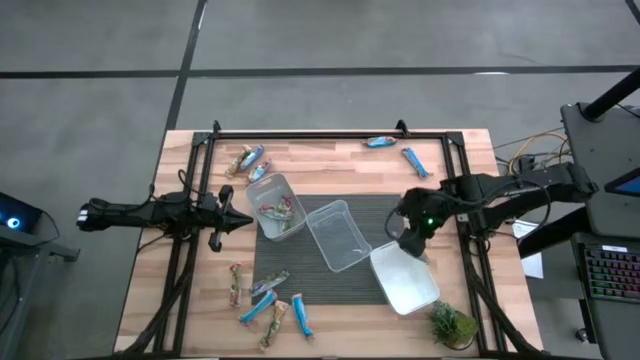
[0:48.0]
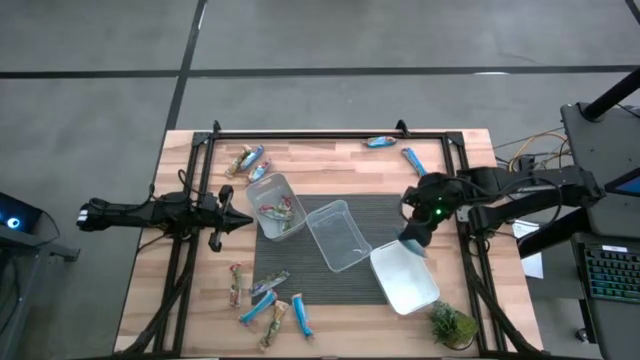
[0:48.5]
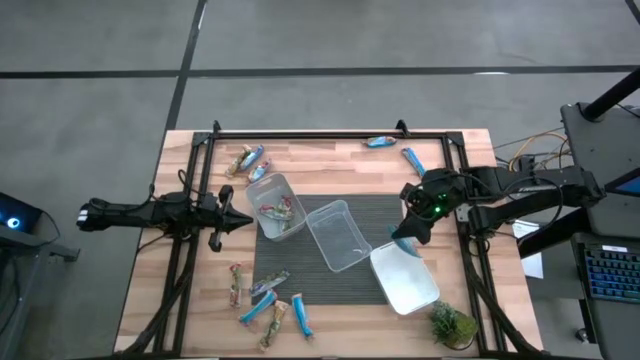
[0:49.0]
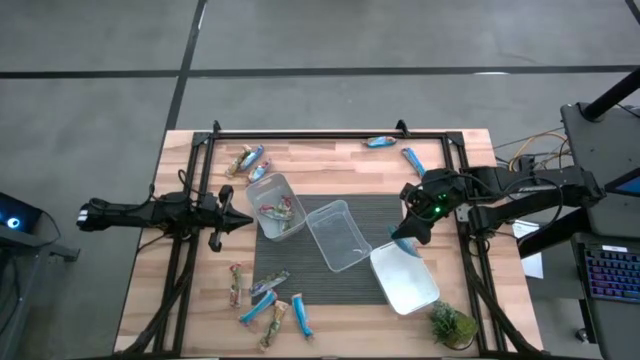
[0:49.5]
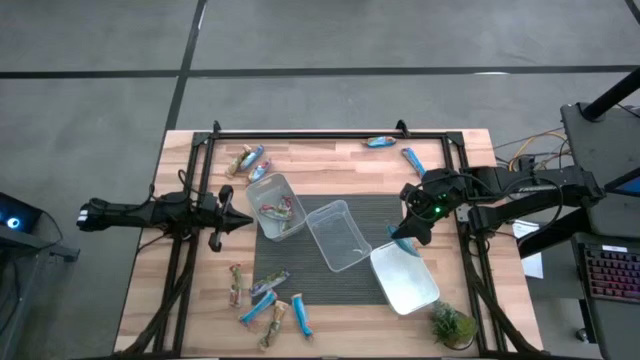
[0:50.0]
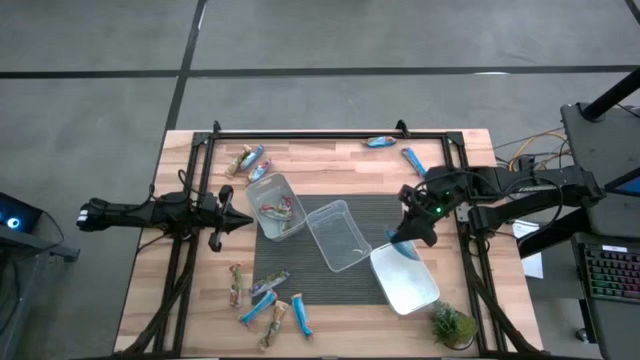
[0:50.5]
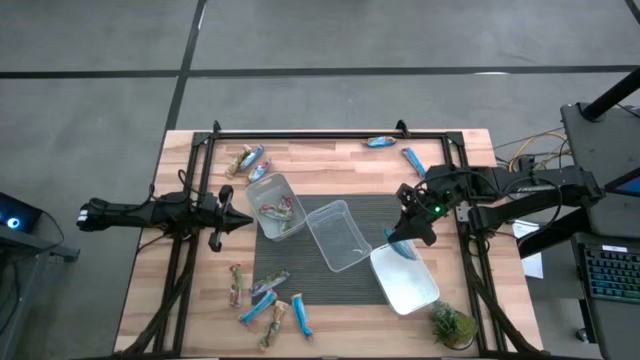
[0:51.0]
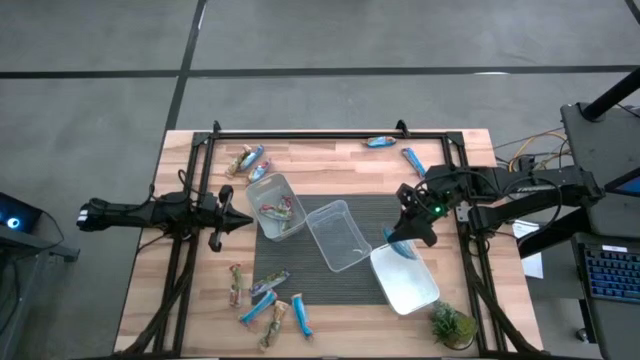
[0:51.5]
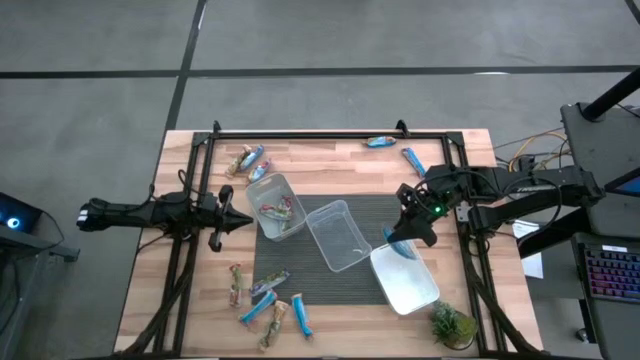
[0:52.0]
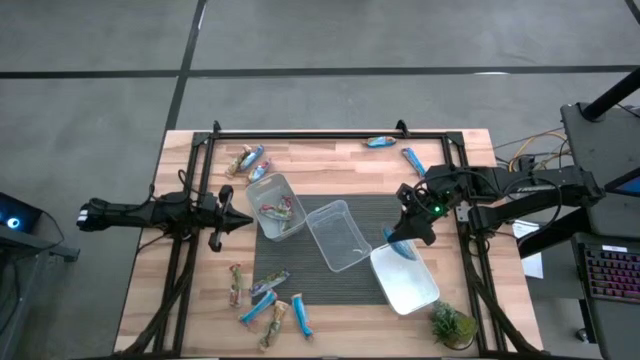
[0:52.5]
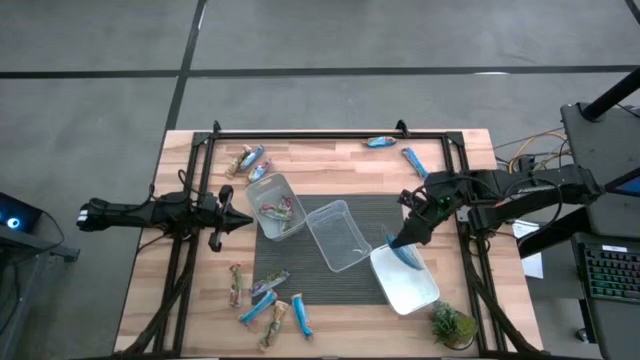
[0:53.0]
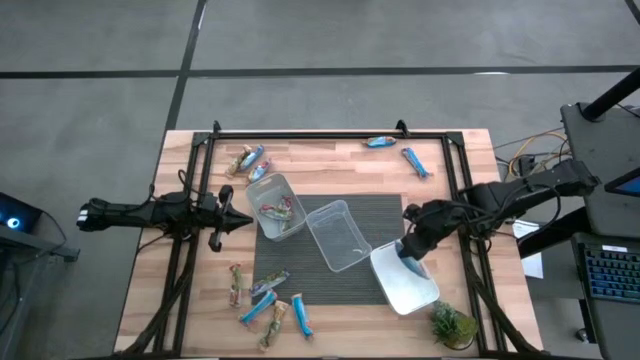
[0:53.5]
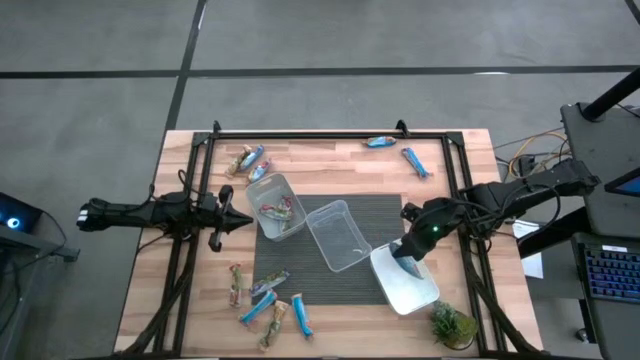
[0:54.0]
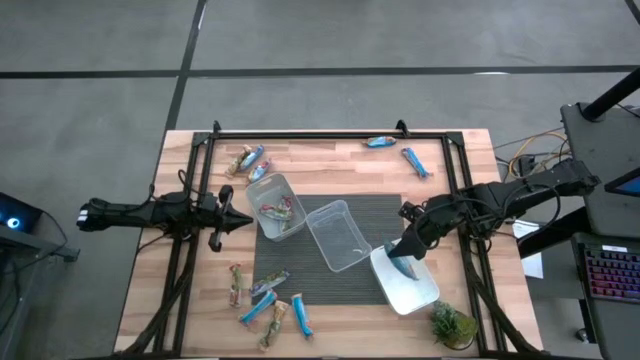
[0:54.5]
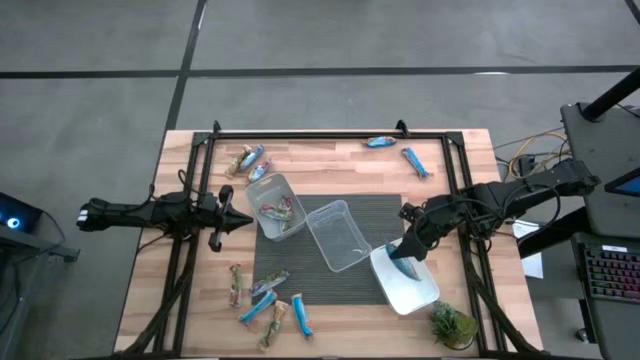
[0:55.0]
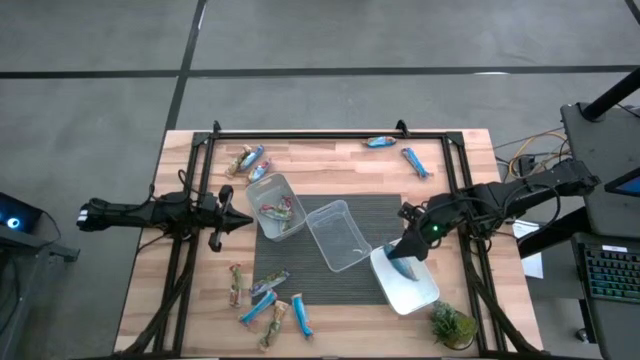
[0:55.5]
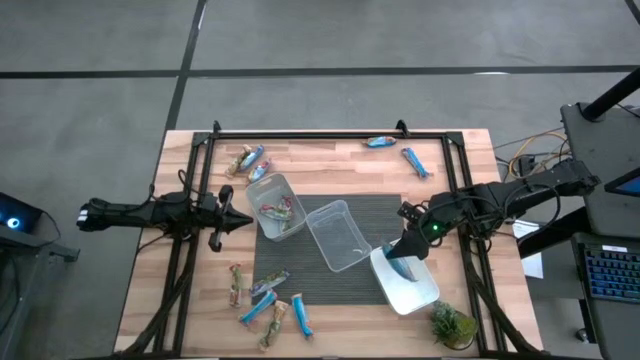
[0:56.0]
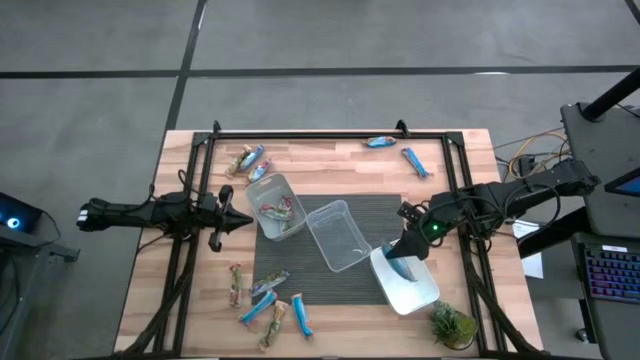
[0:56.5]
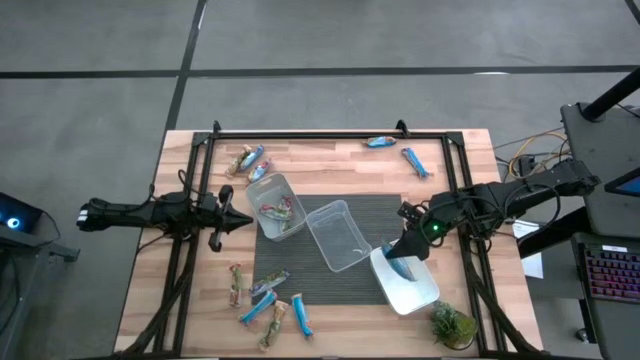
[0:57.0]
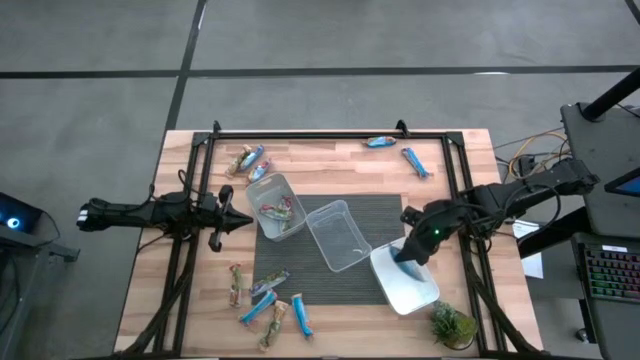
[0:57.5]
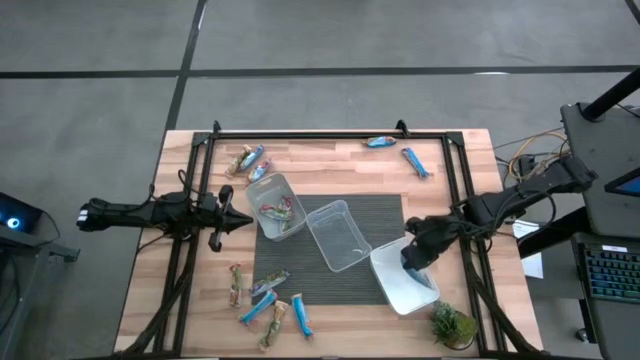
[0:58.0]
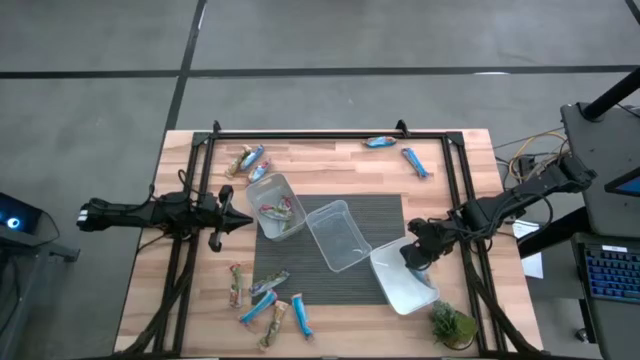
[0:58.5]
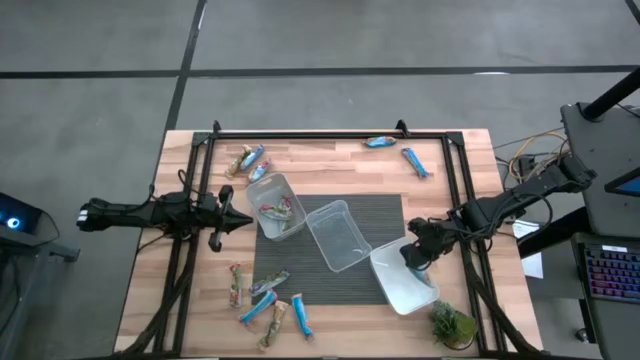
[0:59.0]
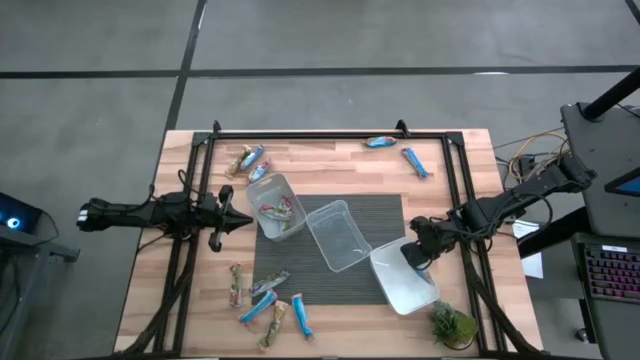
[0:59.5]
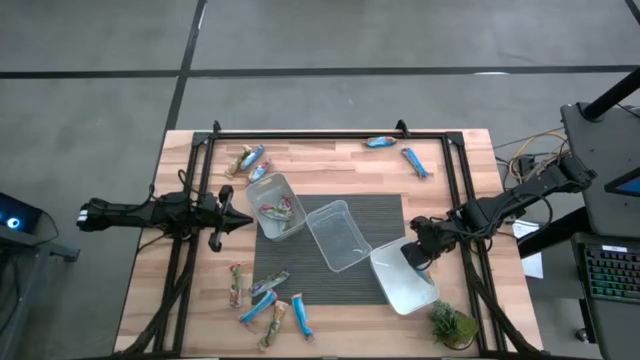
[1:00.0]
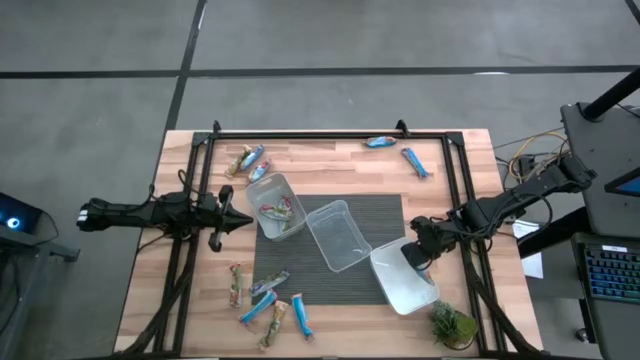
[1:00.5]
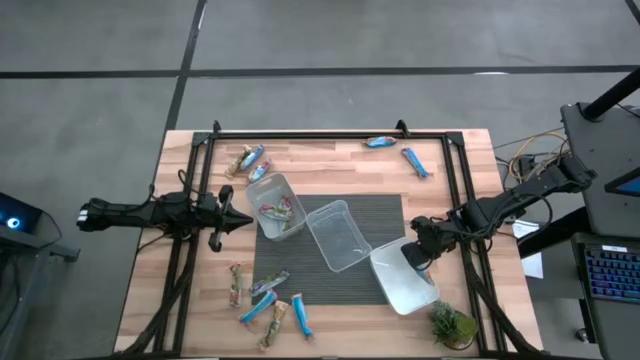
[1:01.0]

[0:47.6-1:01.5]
Task: Pick and place Granola Bars by type
Put the yellow granola bar into the white bin

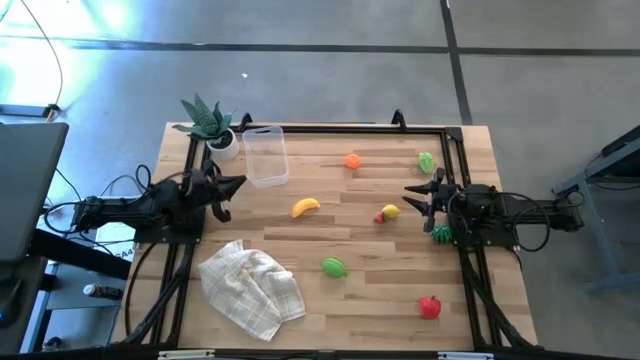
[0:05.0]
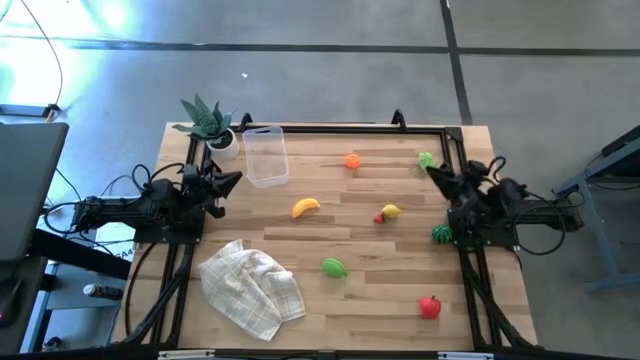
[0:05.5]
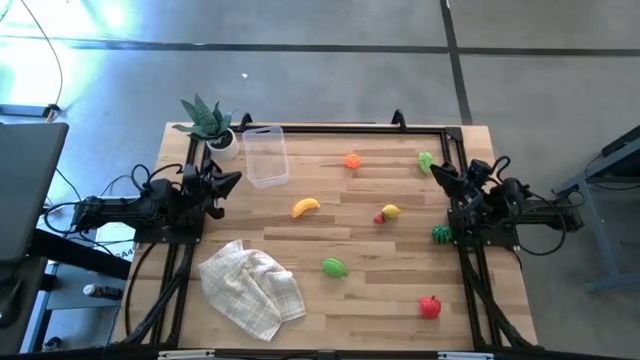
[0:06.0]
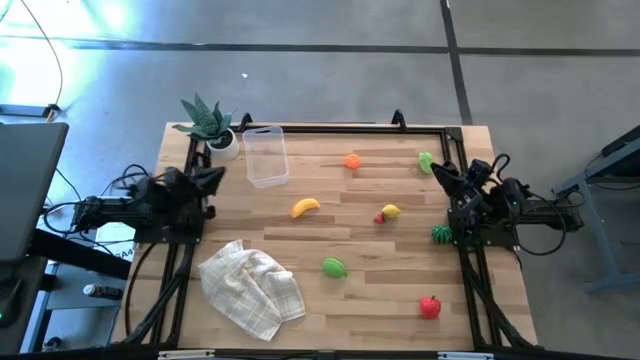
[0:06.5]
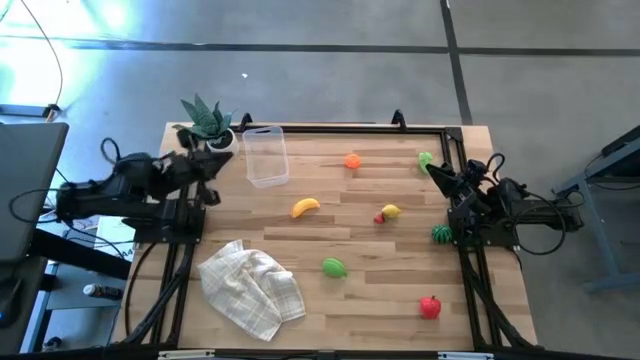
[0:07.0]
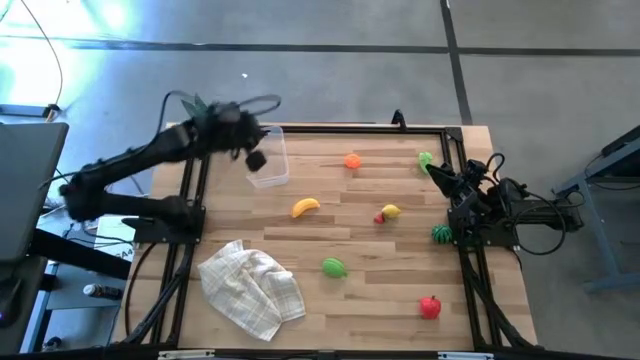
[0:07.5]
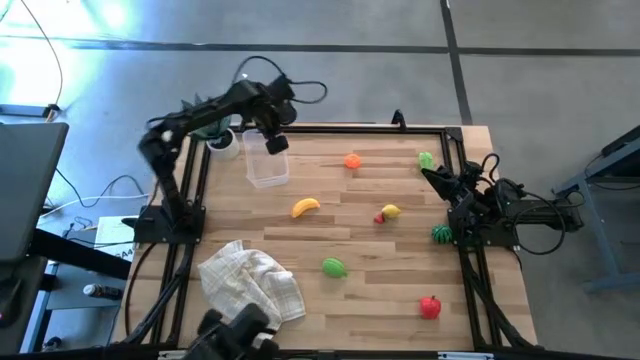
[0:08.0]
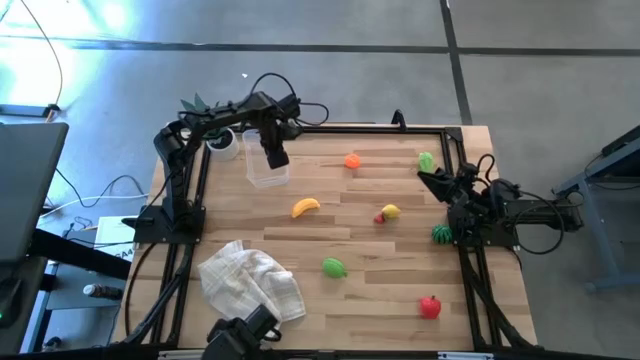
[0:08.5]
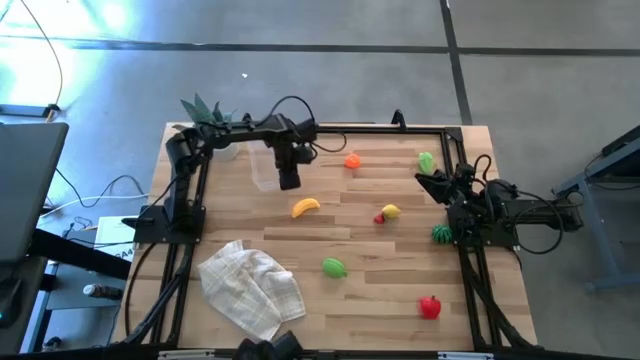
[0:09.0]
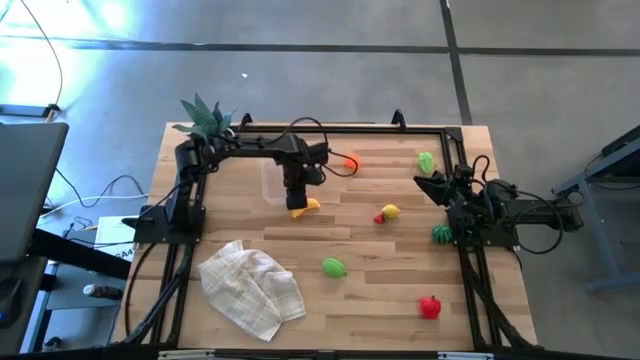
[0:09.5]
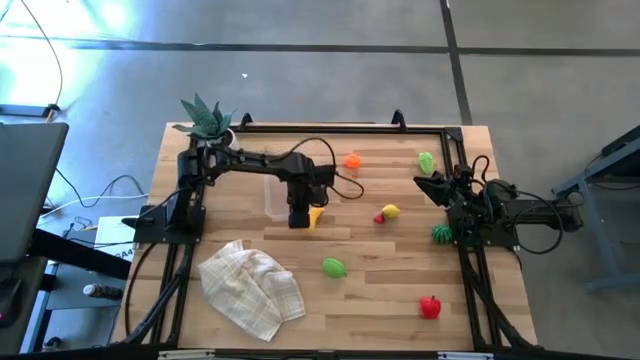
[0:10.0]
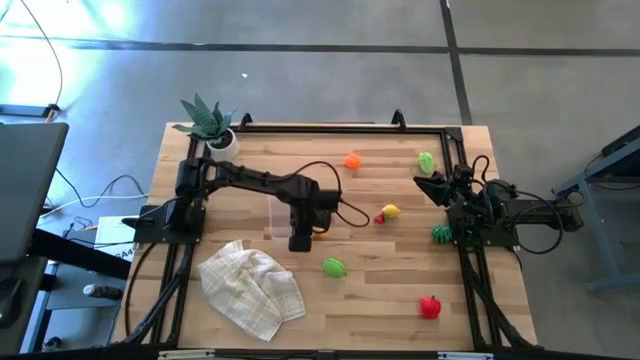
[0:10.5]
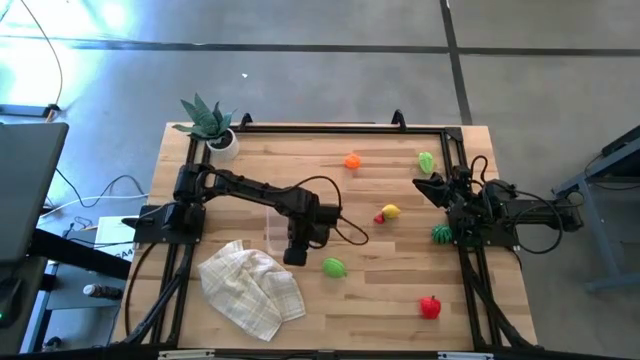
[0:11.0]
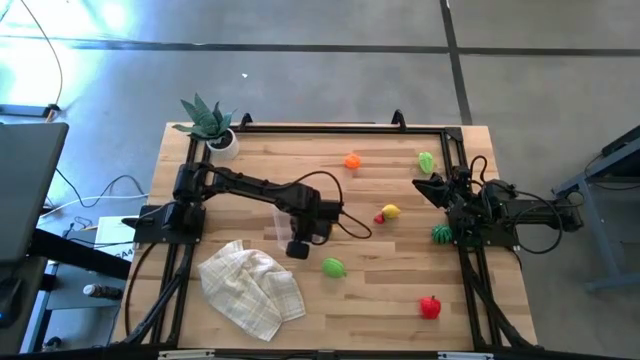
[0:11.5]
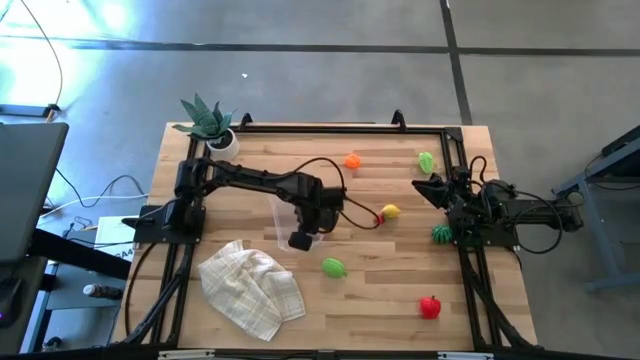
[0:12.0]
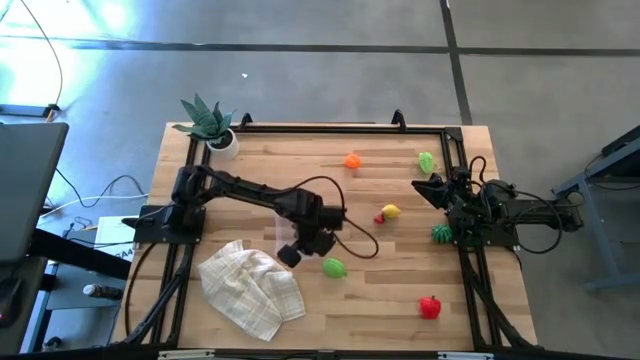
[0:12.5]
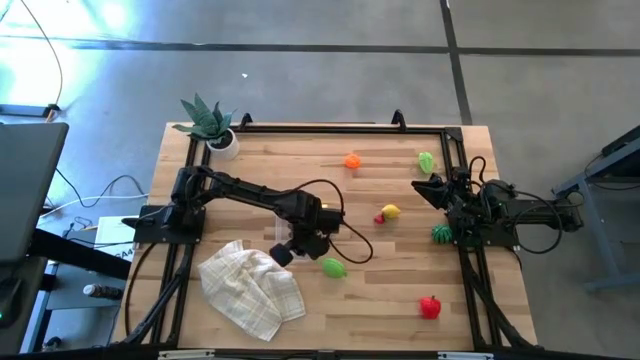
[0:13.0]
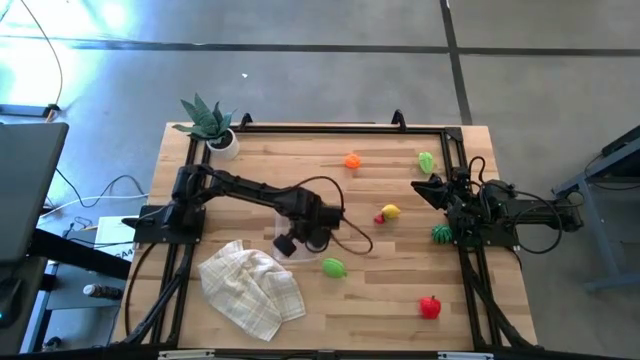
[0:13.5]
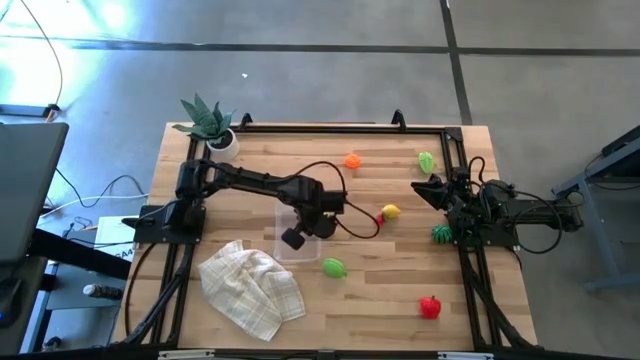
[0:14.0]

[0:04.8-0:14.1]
Task: Pick and placing Produce into tupperware
Prepare the transparent bin on the table
